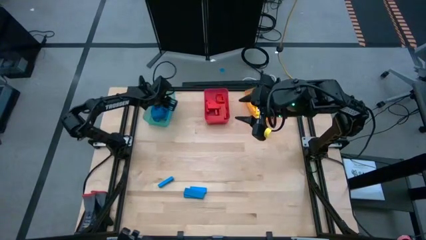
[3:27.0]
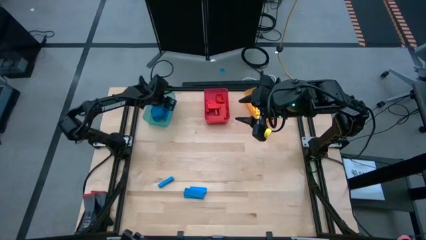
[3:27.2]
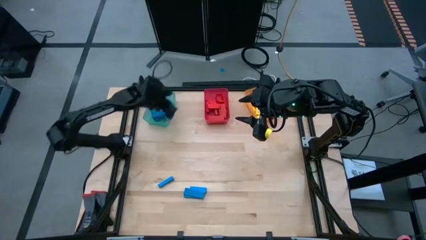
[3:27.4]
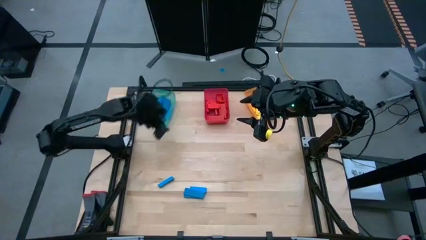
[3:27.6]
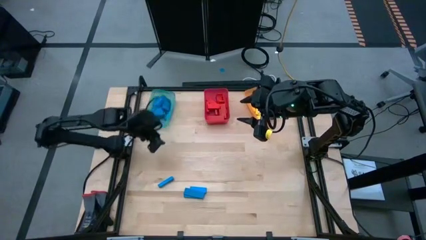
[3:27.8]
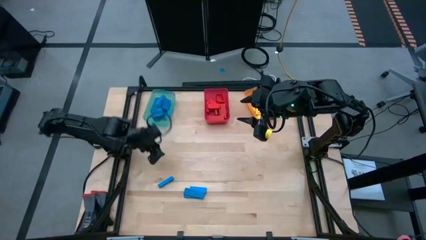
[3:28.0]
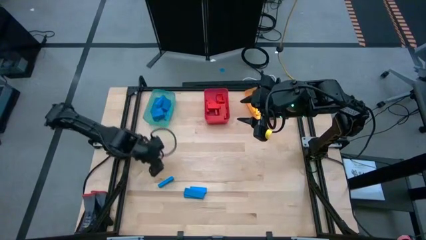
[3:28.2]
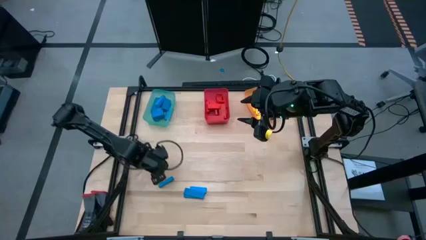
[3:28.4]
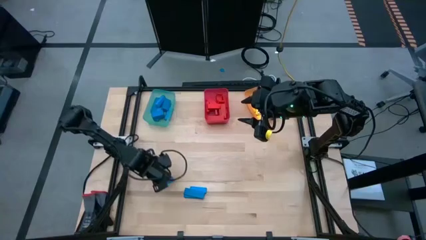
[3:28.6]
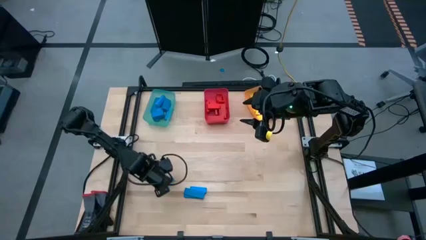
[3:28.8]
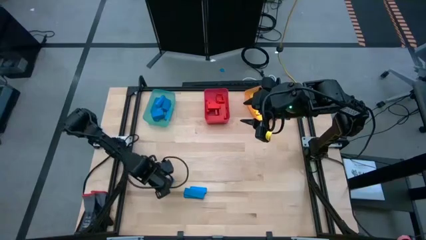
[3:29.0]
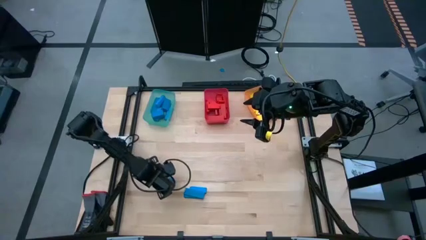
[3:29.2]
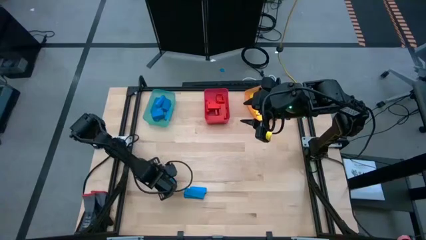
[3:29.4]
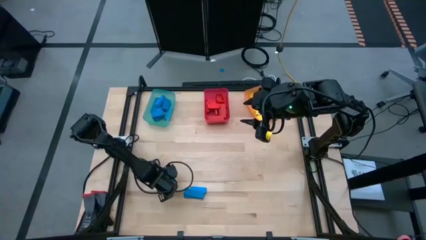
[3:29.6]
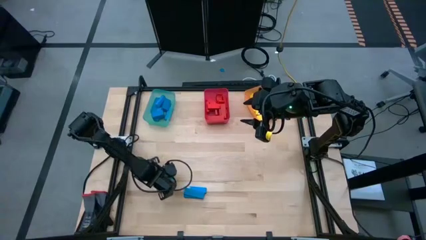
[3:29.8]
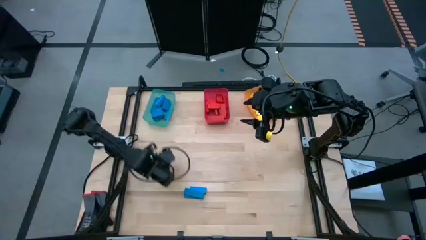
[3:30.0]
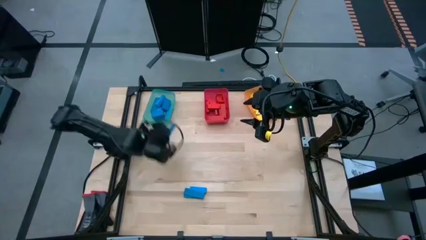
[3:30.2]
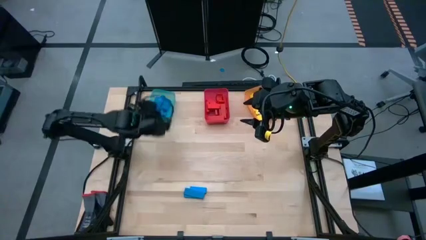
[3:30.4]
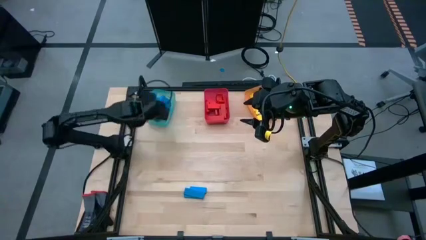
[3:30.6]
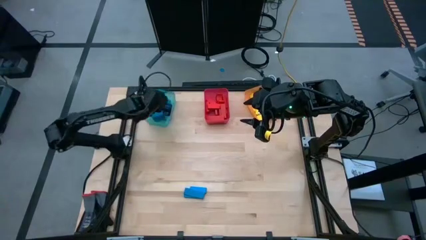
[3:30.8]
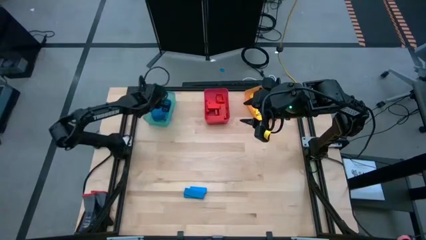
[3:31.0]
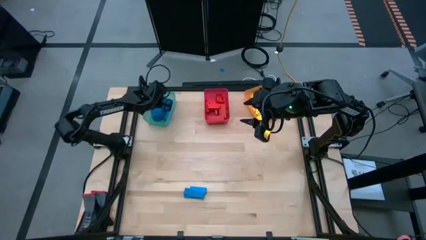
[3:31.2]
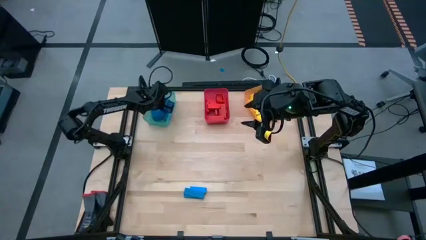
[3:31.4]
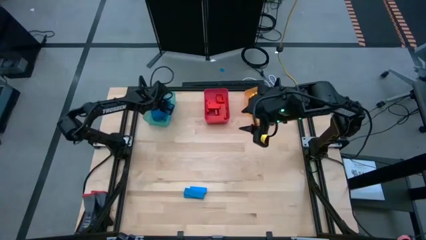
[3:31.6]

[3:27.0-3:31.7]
Task: Sort blocks
Put the blue block into the blue bin

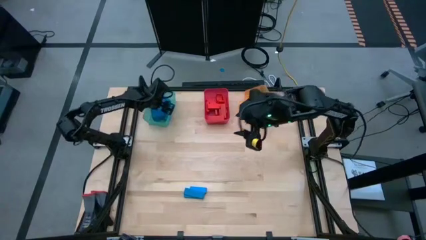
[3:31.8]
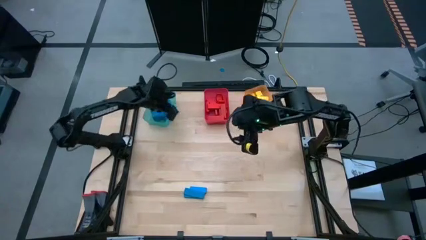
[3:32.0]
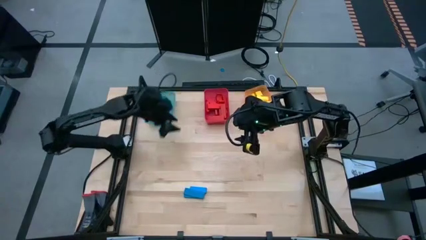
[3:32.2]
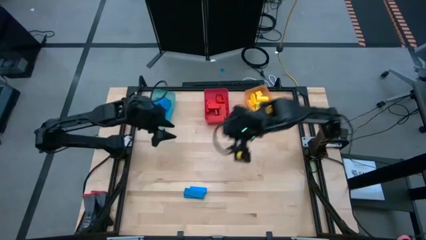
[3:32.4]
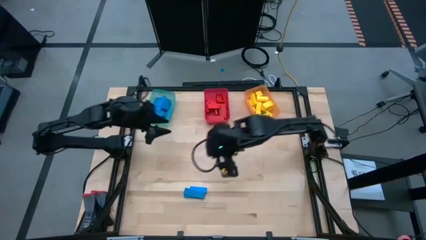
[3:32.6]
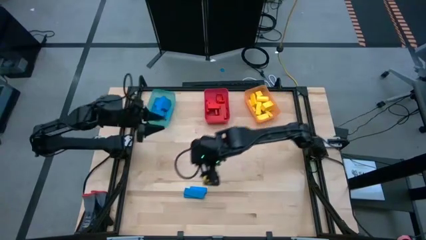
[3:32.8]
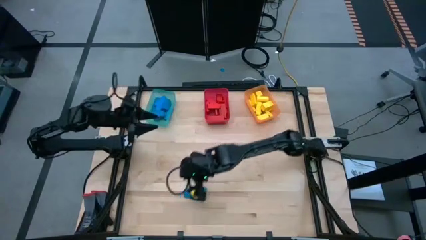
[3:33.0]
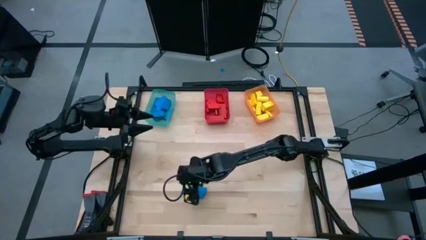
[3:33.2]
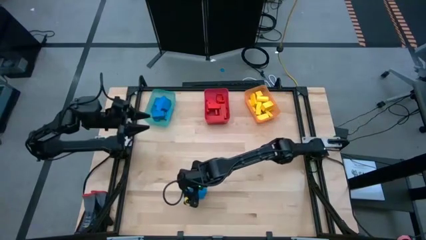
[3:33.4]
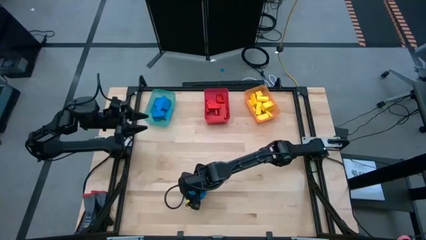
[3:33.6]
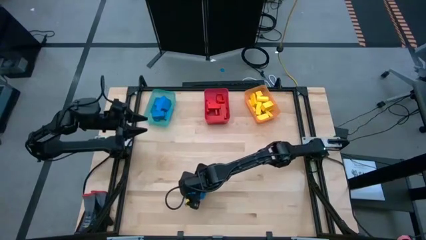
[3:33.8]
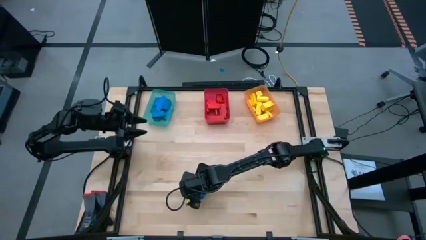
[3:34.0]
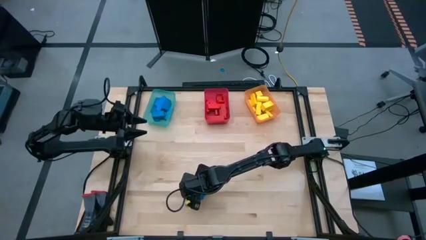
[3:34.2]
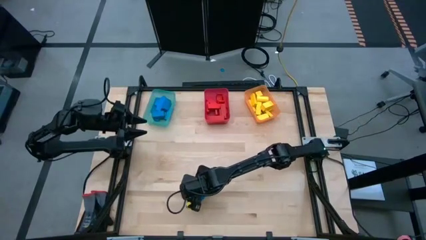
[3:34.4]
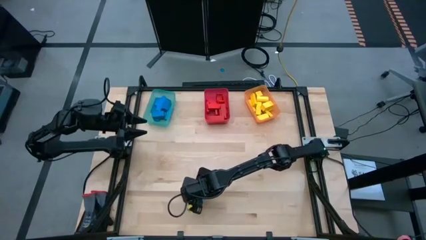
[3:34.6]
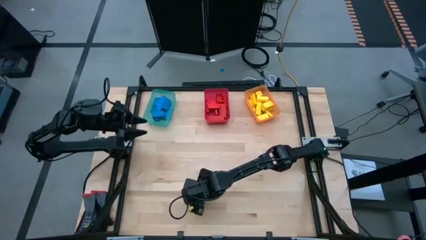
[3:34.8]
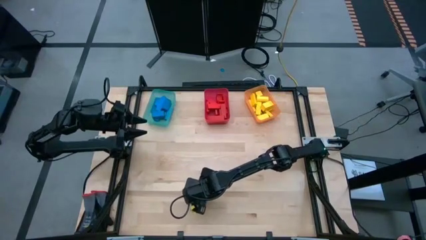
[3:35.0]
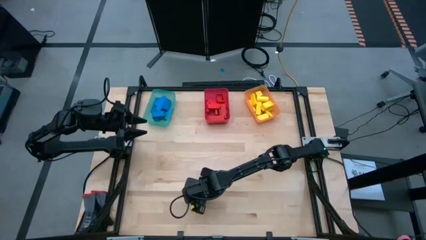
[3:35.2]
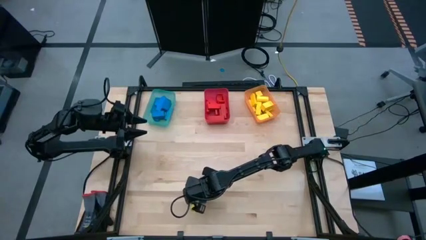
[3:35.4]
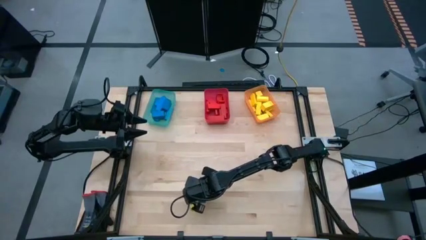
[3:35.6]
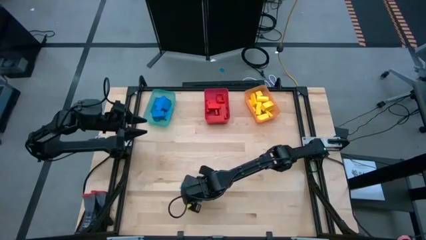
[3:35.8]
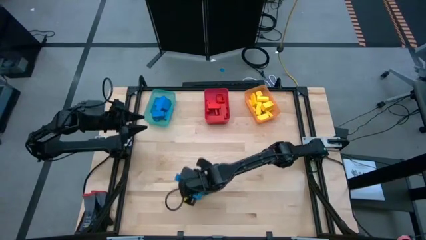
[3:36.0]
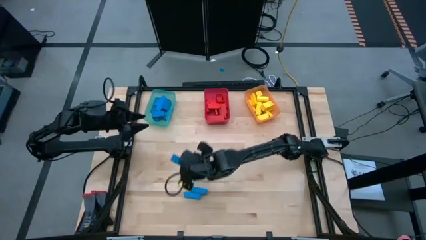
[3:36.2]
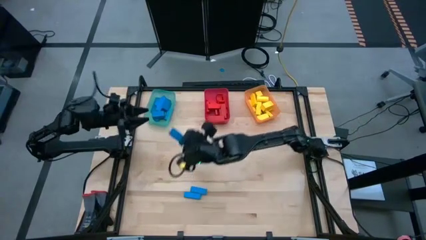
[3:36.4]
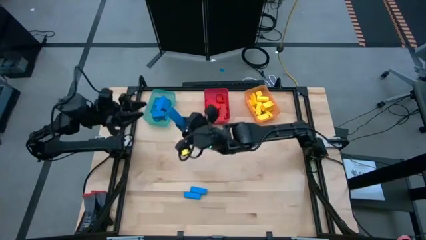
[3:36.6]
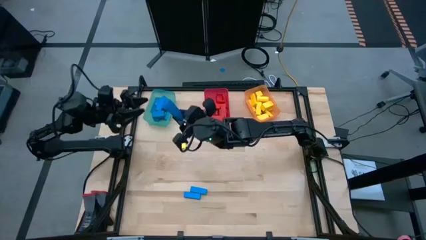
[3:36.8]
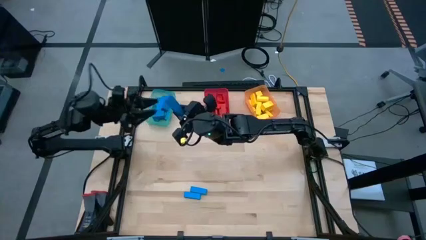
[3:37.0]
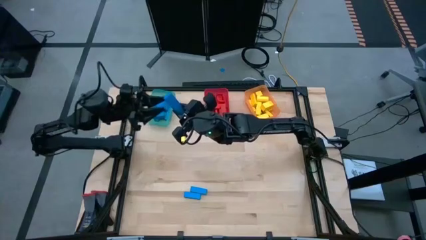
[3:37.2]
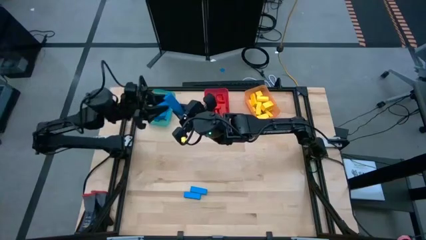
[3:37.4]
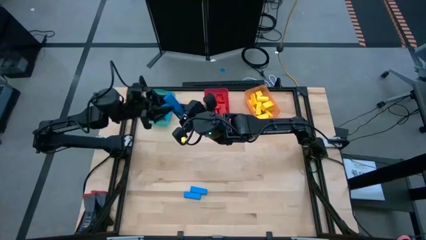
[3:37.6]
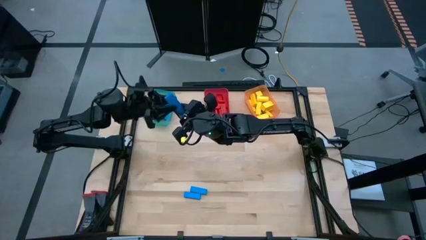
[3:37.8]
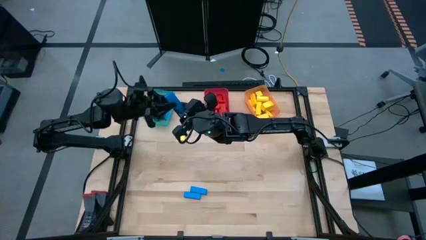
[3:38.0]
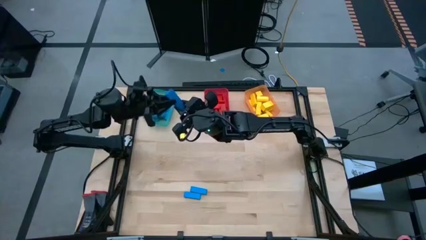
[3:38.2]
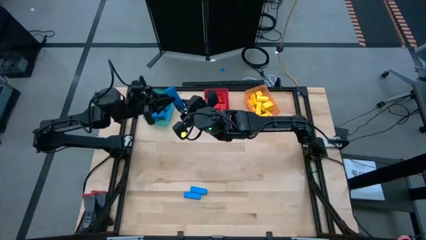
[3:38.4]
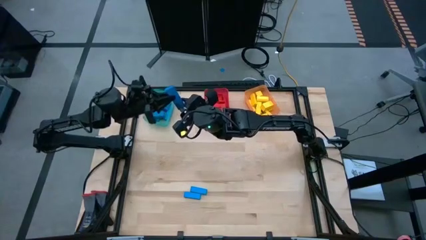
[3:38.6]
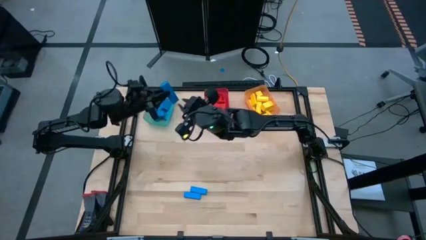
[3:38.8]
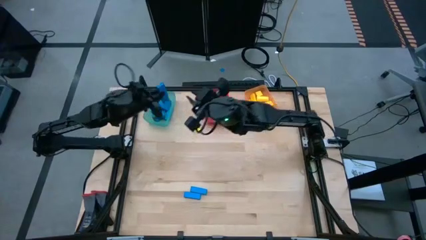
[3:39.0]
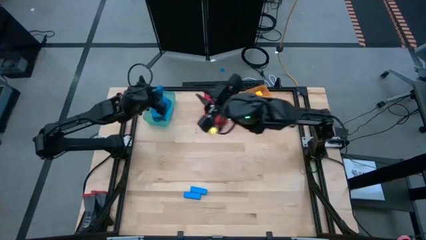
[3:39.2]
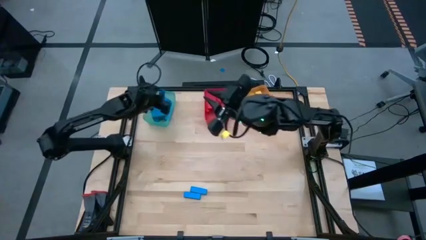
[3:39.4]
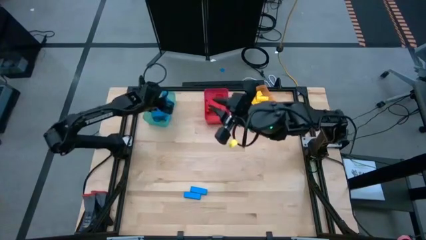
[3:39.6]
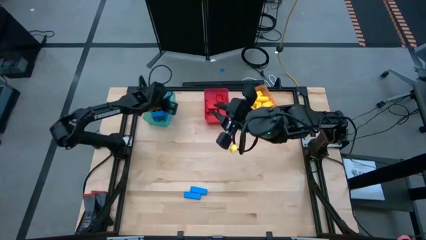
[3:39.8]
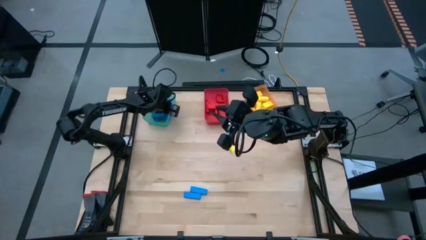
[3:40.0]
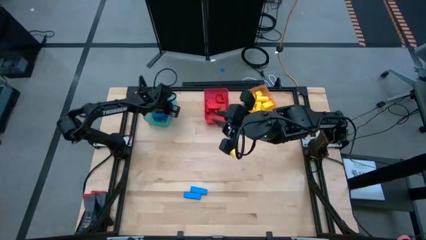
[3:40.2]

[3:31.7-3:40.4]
Put the blue block into the blue bin
